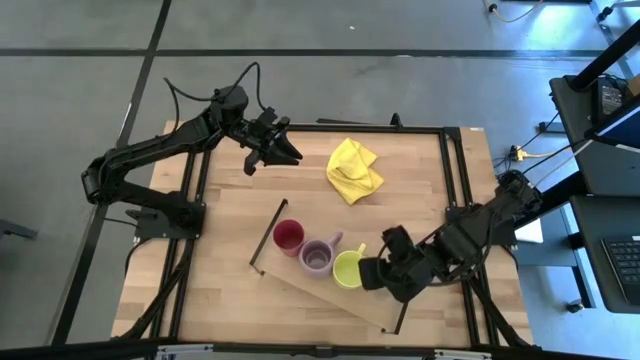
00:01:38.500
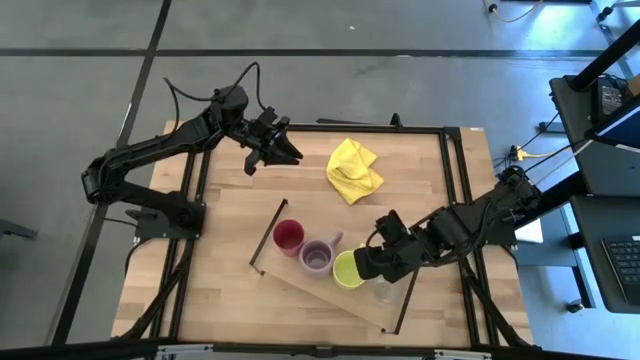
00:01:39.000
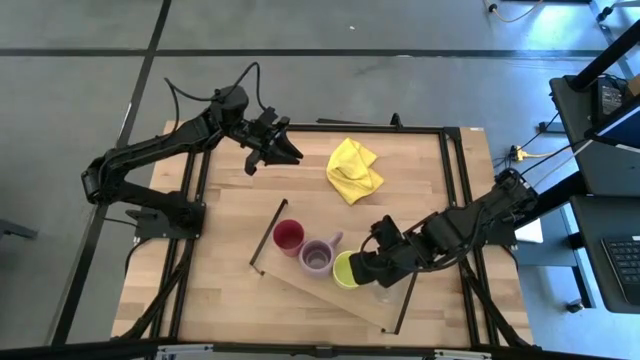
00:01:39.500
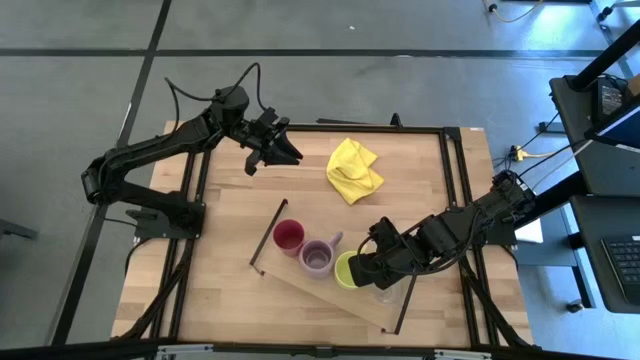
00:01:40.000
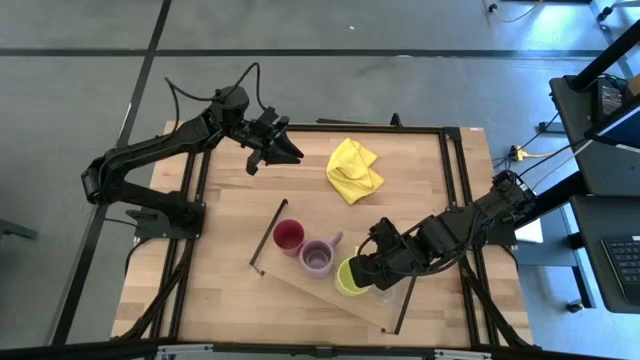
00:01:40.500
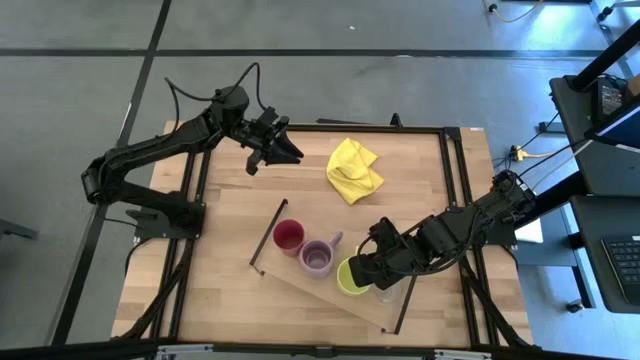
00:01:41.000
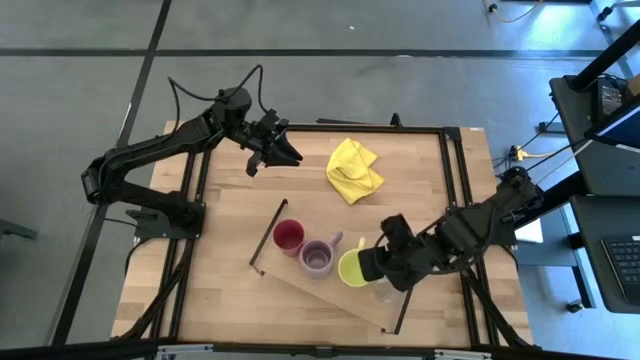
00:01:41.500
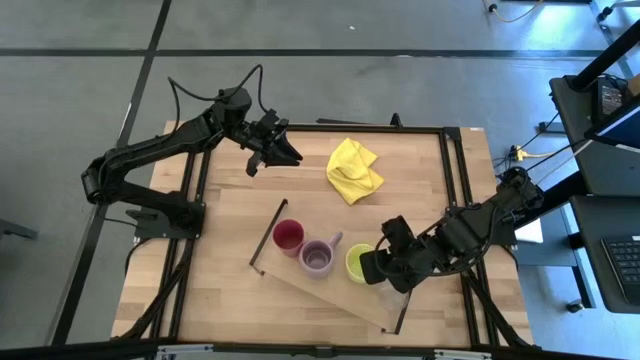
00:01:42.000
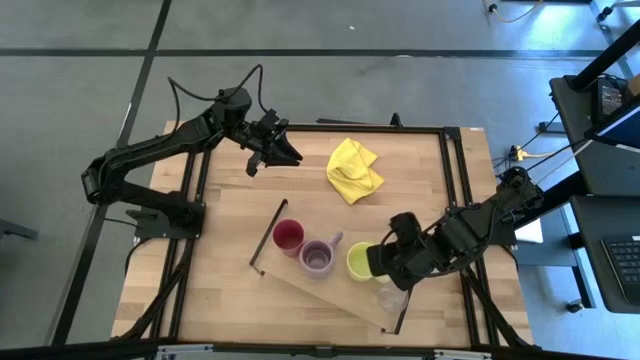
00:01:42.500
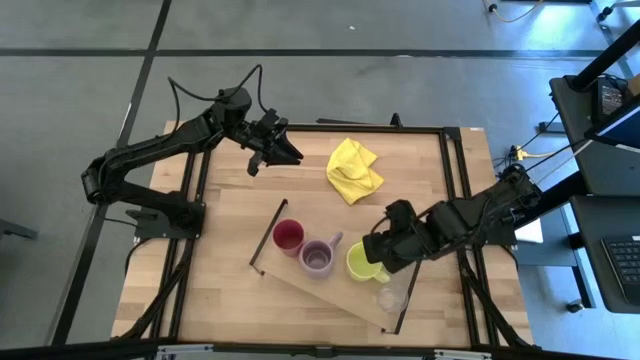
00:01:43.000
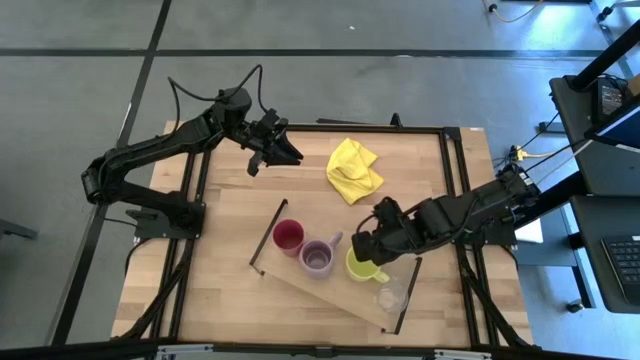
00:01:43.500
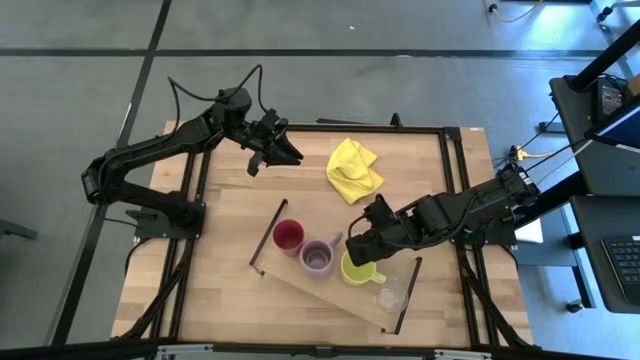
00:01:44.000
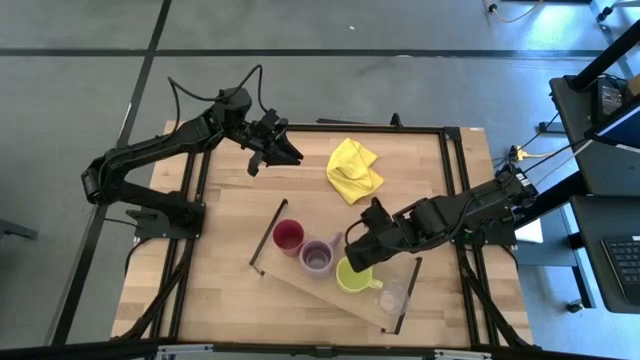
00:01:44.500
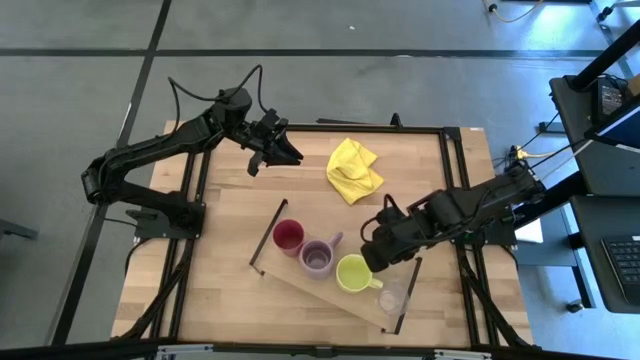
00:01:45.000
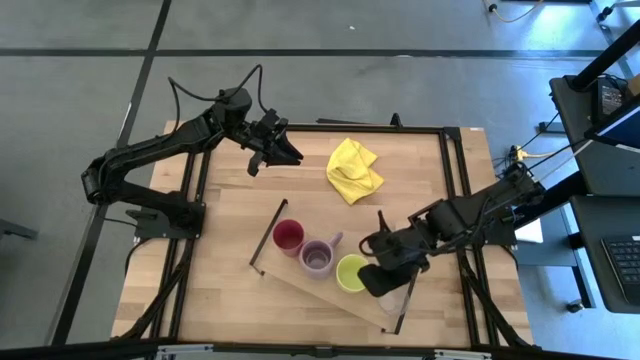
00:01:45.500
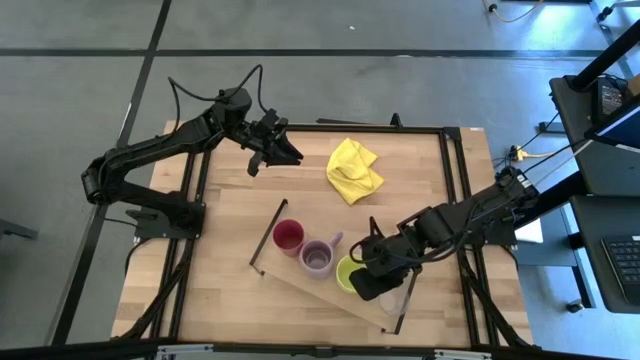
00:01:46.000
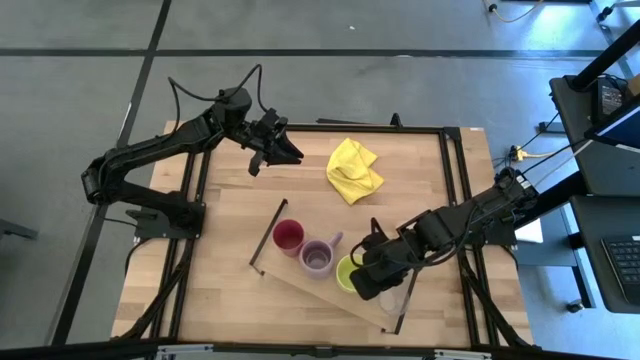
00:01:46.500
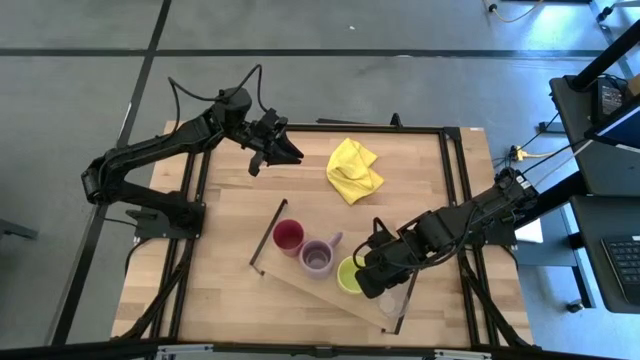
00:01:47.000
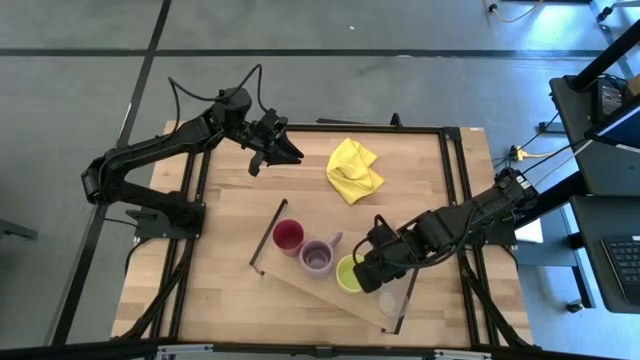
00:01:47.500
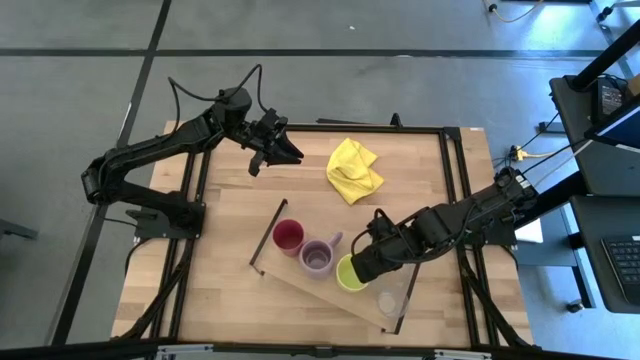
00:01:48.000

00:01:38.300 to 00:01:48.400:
Task: Stack small to large cups/mugs on shelf
Adjust the yellow mug on the shelf

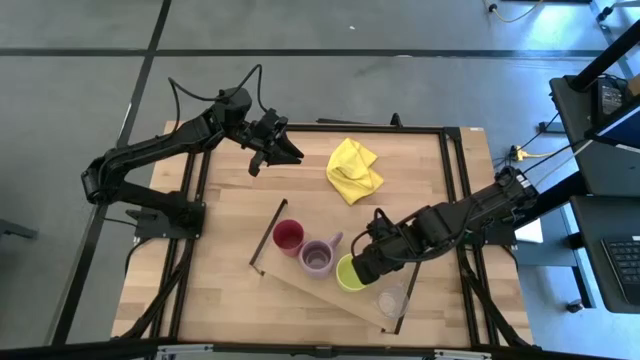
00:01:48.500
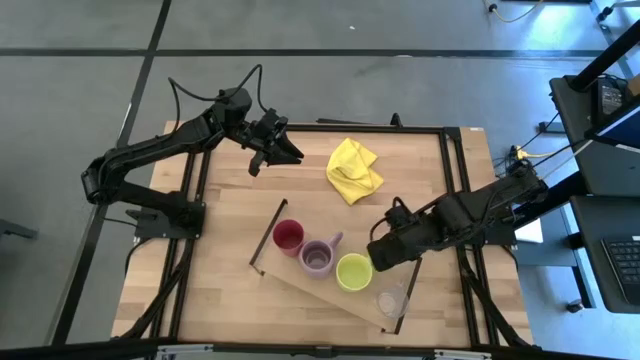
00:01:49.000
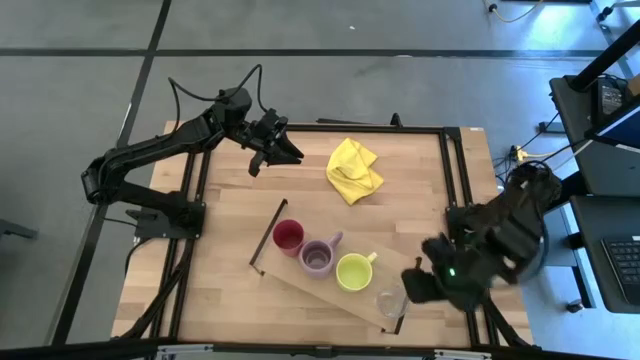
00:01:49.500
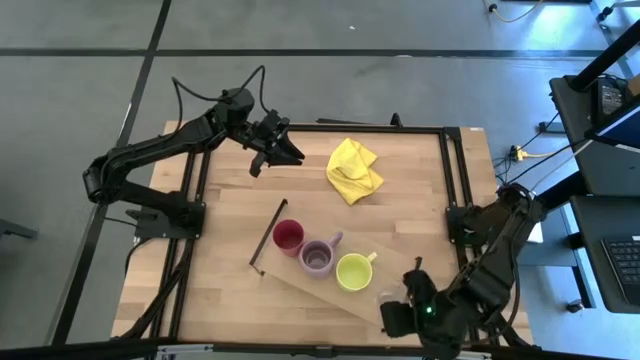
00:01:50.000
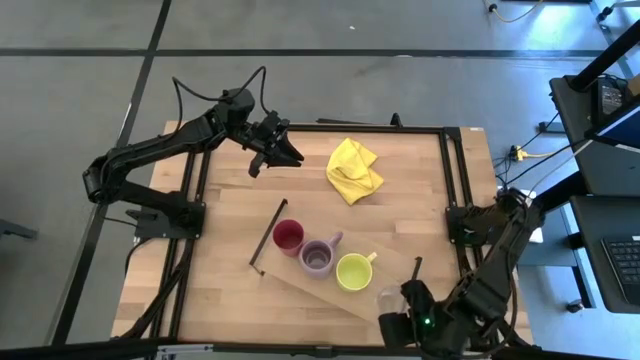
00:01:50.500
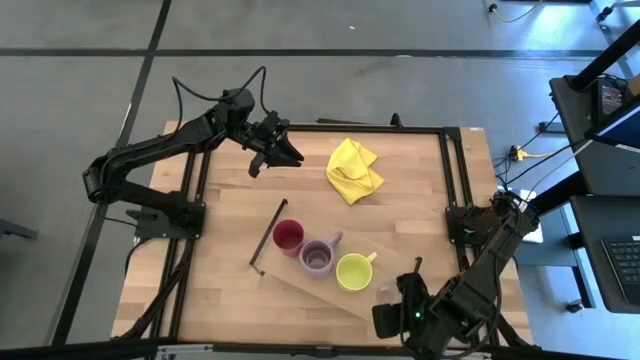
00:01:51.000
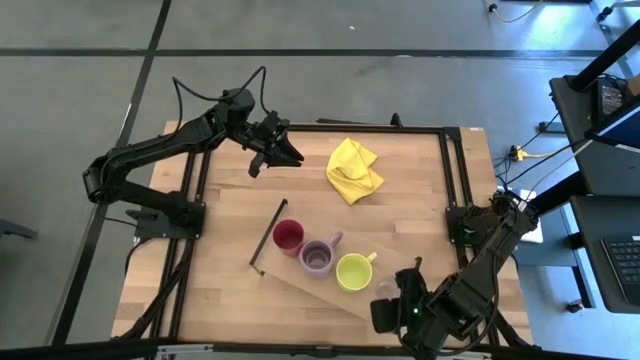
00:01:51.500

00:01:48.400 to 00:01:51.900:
Adjust the transparent mug on the shelf

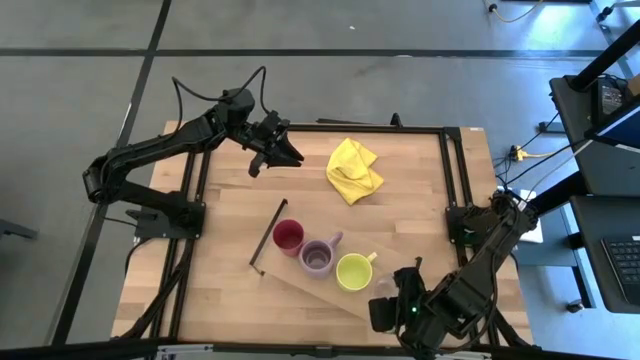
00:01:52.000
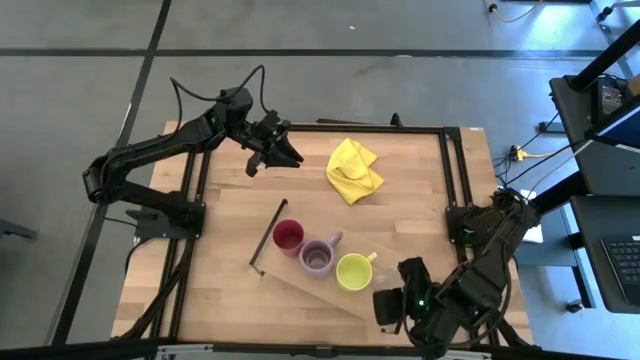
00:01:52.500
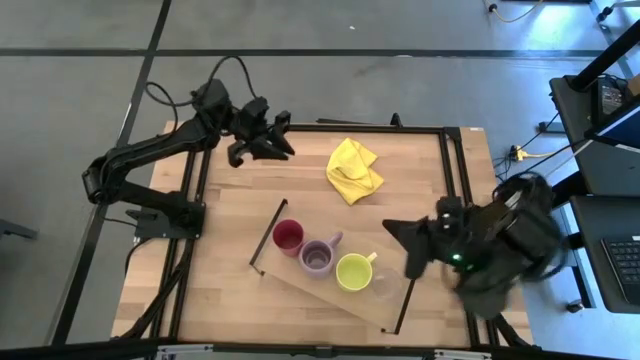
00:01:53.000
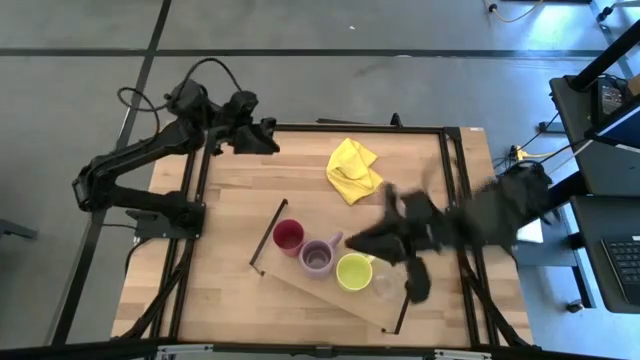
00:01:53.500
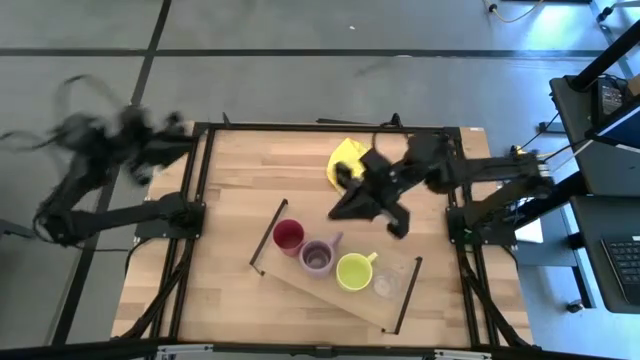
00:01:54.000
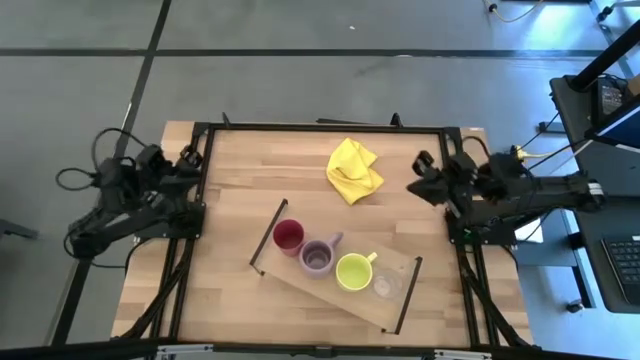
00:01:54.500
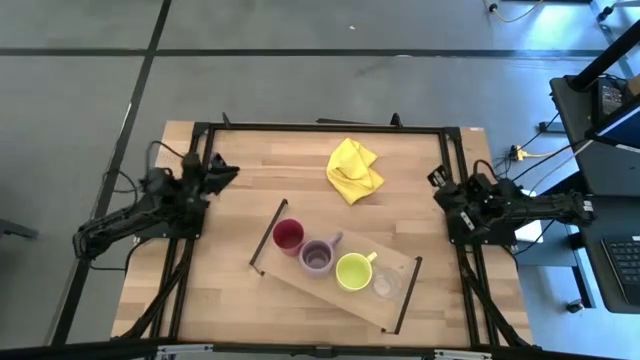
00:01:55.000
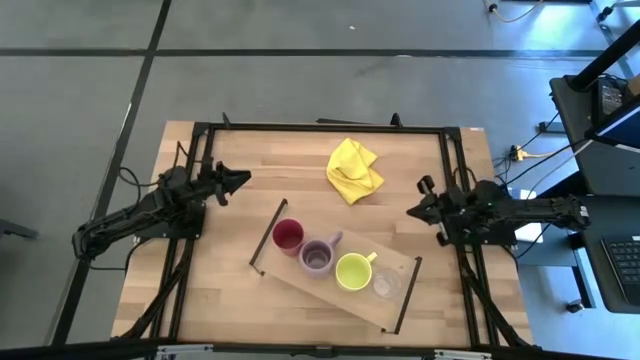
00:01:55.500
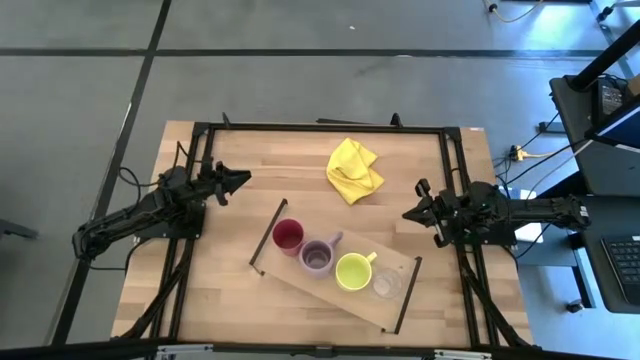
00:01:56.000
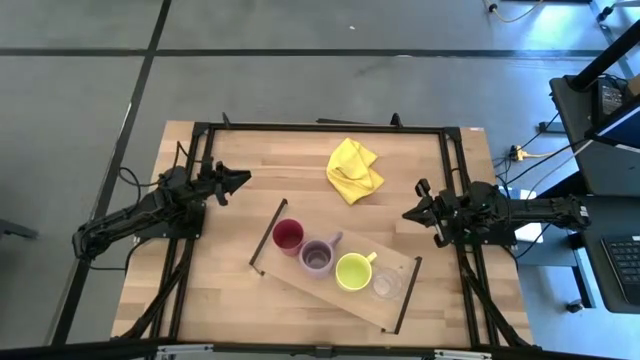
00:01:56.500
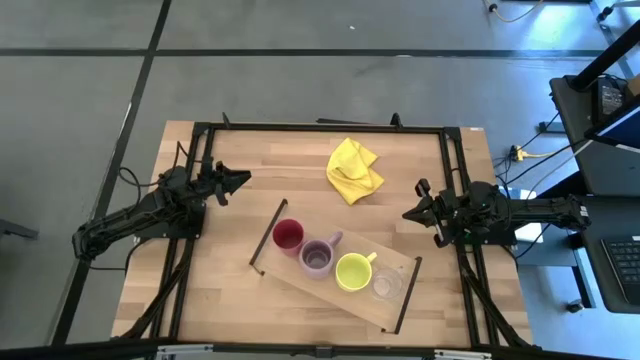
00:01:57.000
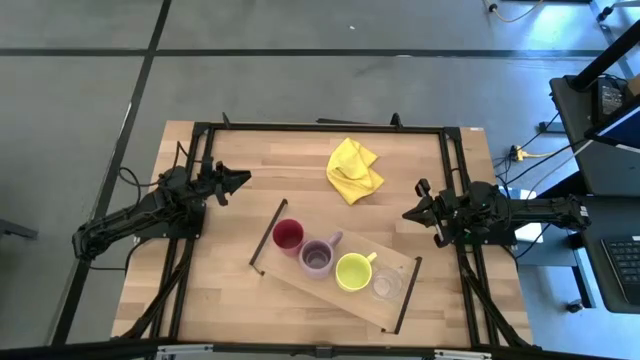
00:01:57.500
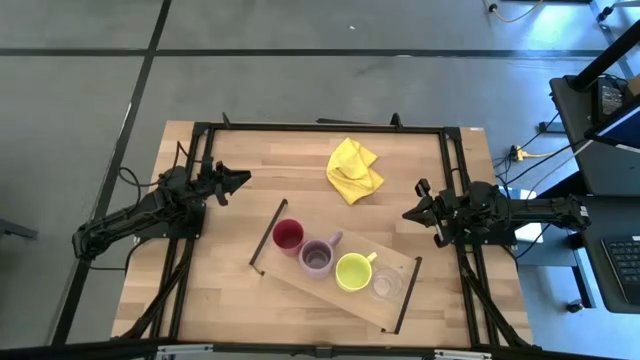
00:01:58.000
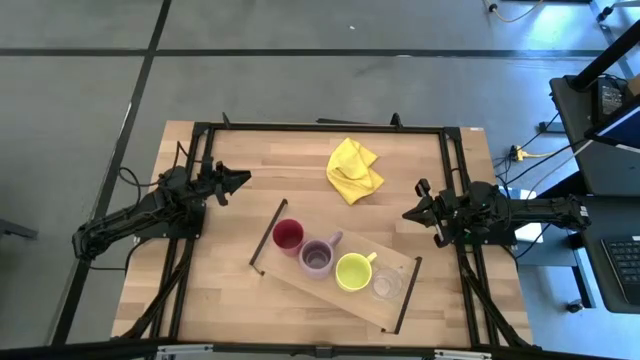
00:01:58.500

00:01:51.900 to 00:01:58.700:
Return to Home Position
